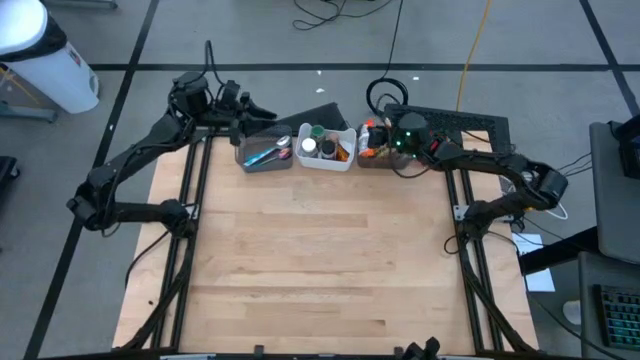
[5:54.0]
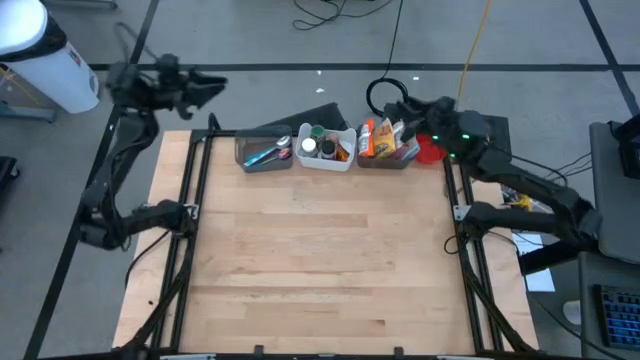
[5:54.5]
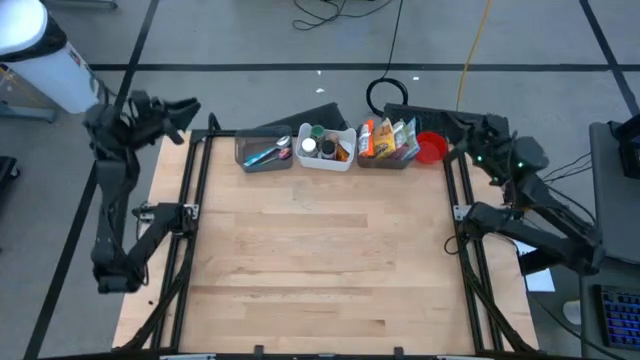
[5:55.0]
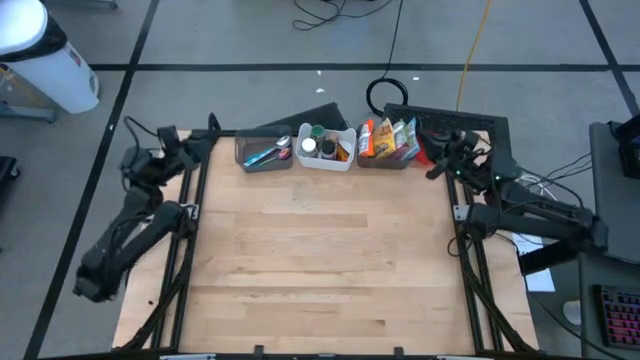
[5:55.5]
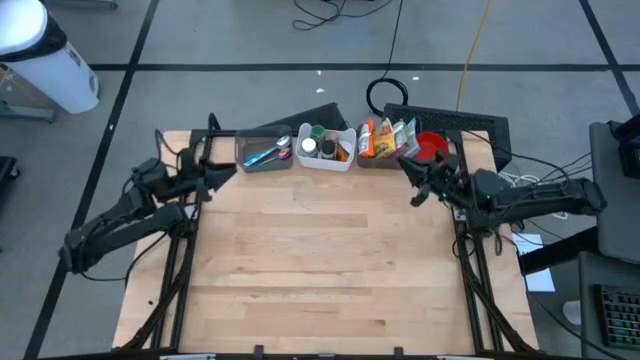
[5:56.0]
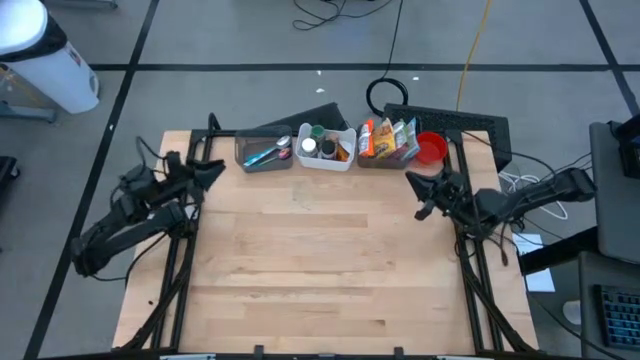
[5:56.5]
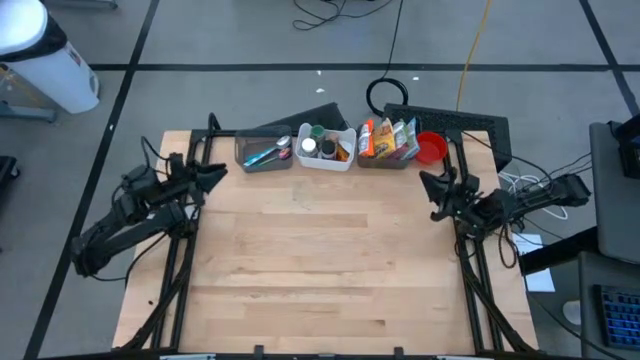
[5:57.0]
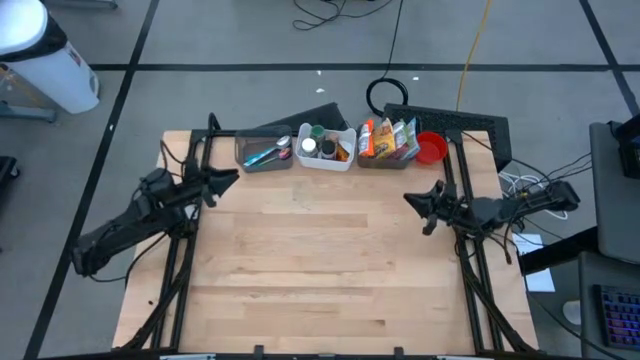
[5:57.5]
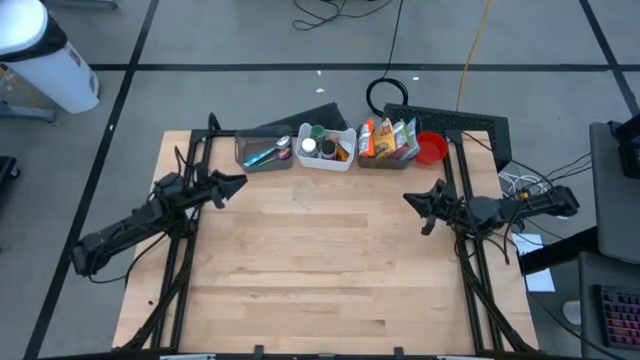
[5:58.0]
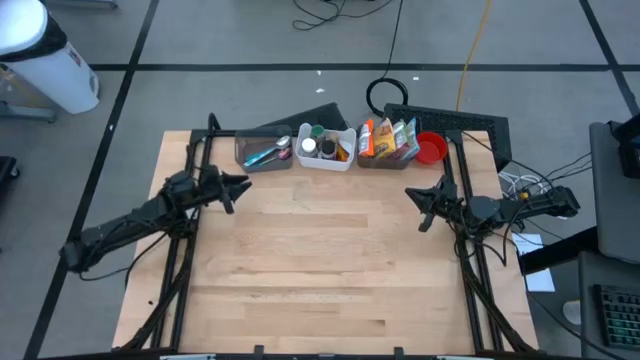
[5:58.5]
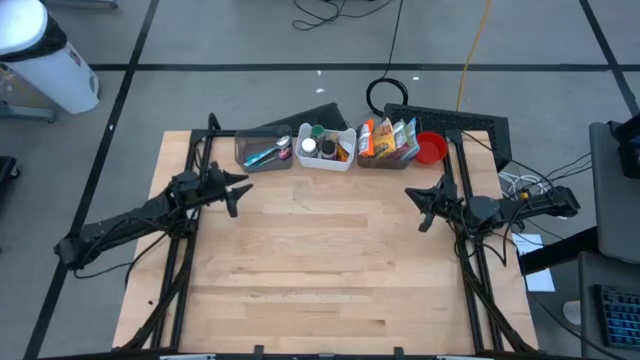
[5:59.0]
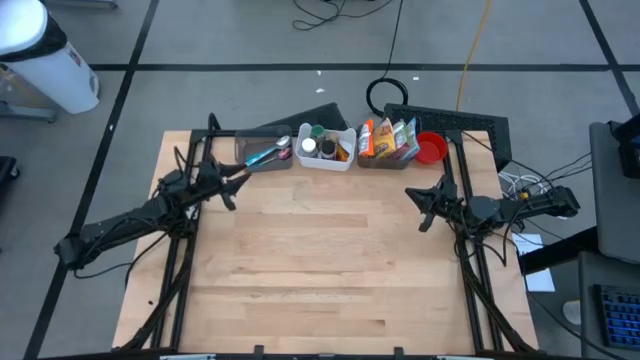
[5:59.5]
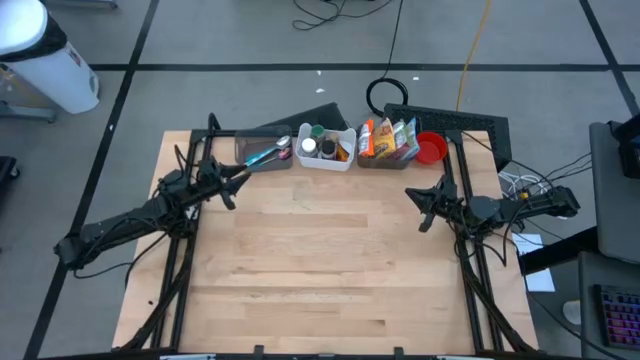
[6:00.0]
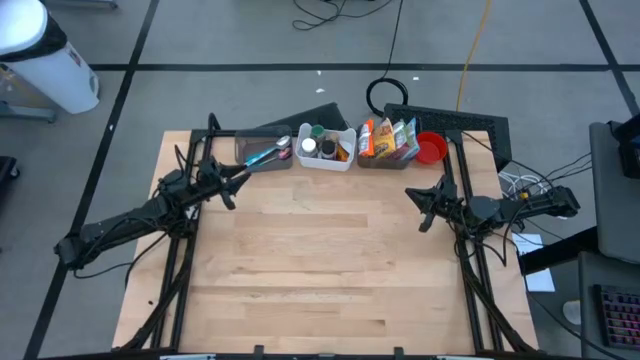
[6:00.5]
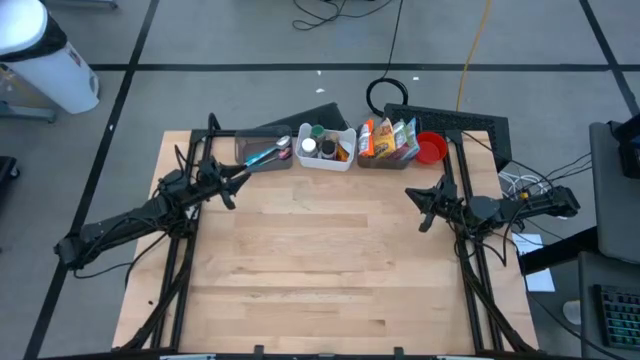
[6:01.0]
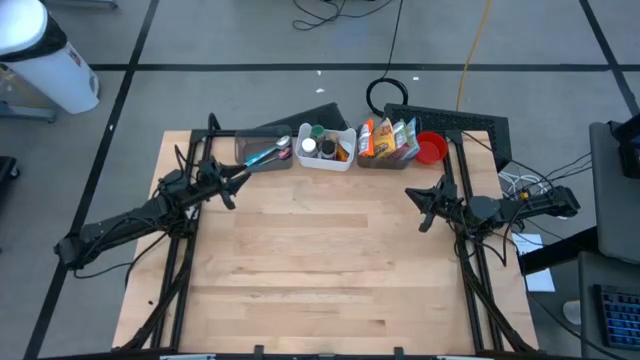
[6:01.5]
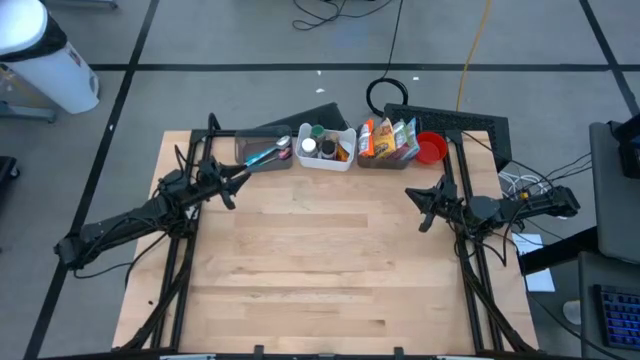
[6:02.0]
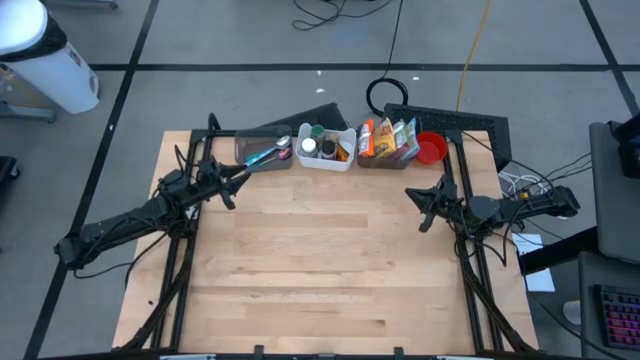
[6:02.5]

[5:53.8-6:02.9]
Task: Pick & Place Food Item
Return to Home Position

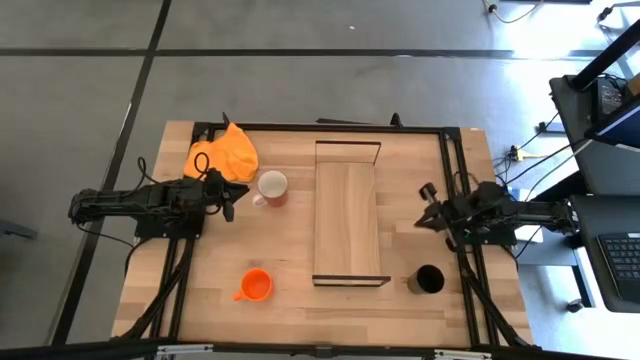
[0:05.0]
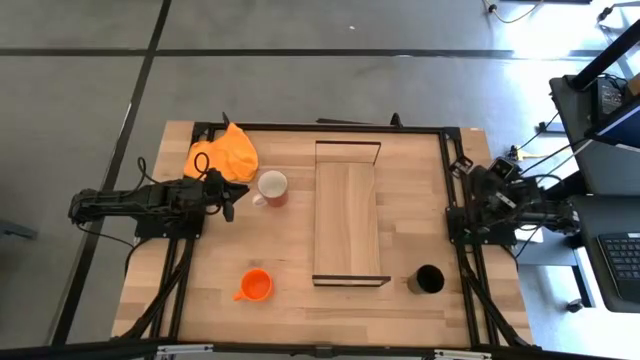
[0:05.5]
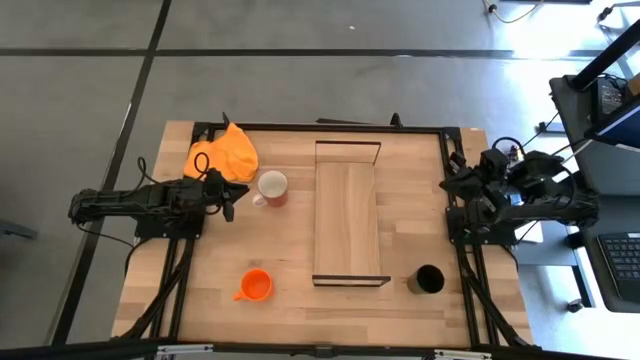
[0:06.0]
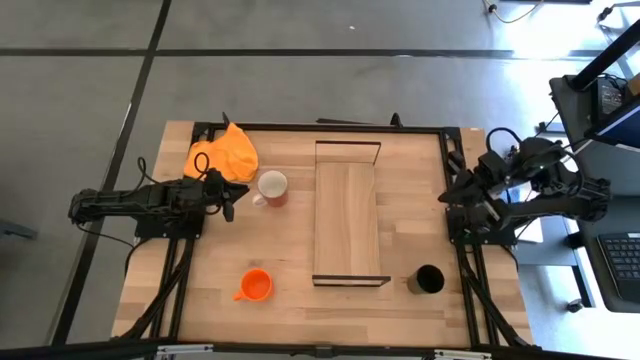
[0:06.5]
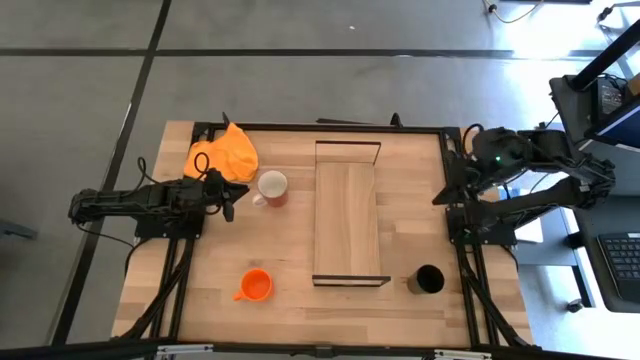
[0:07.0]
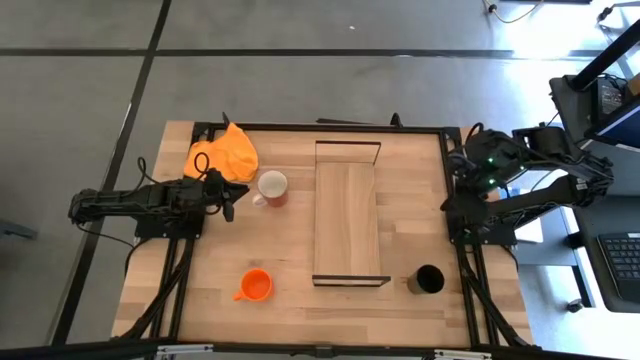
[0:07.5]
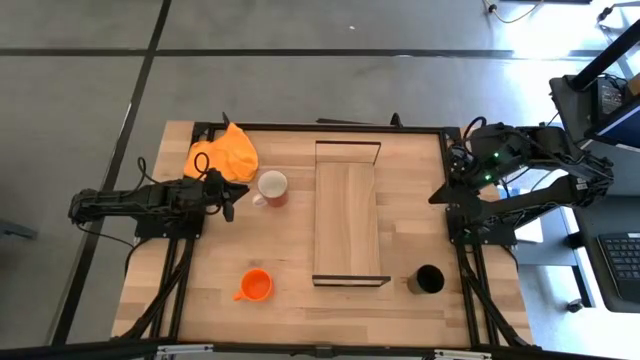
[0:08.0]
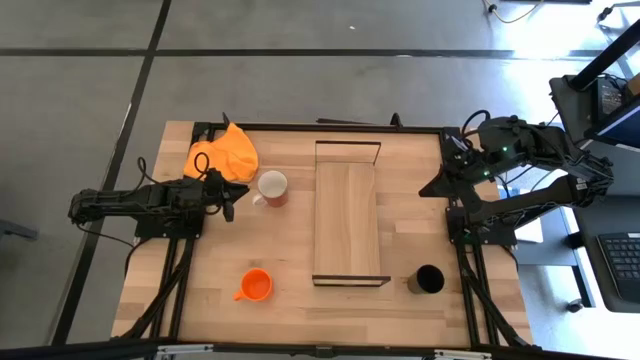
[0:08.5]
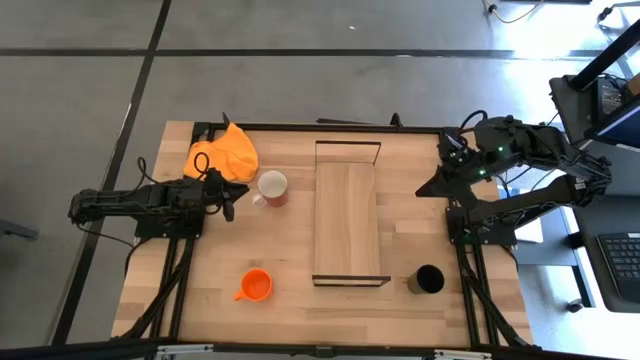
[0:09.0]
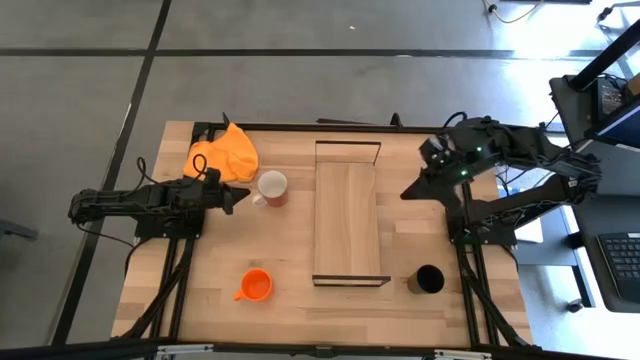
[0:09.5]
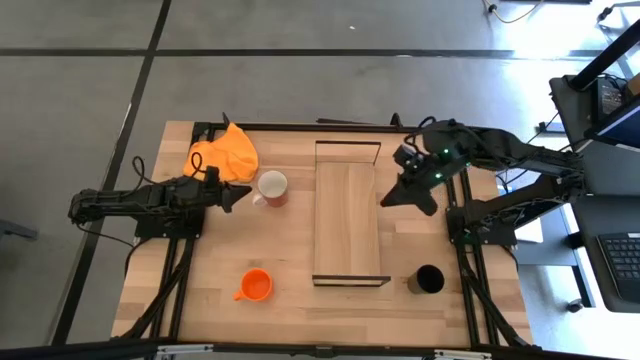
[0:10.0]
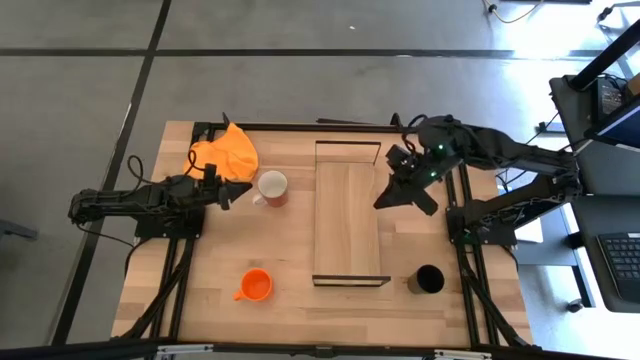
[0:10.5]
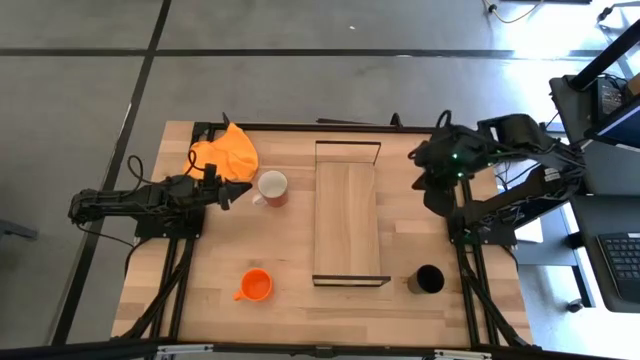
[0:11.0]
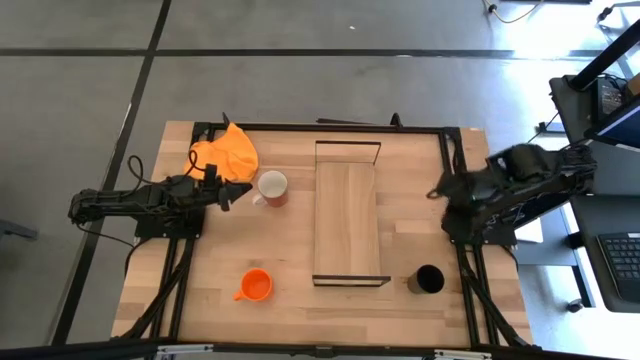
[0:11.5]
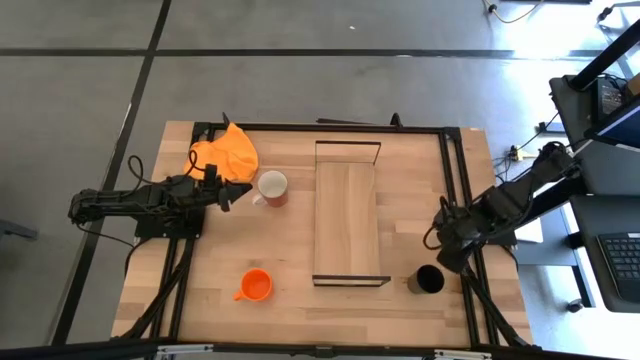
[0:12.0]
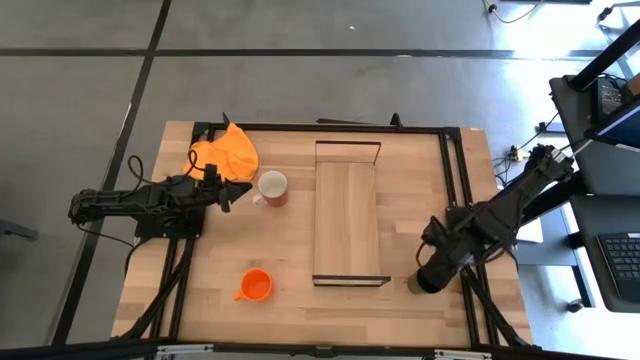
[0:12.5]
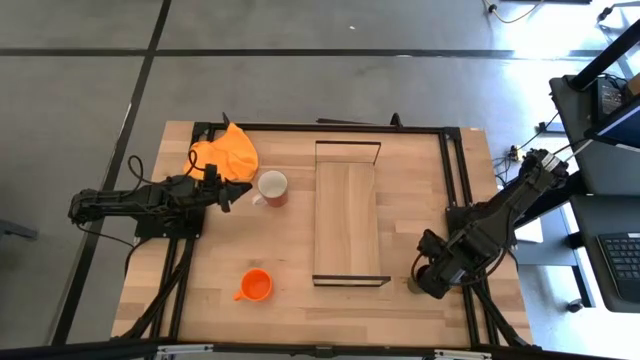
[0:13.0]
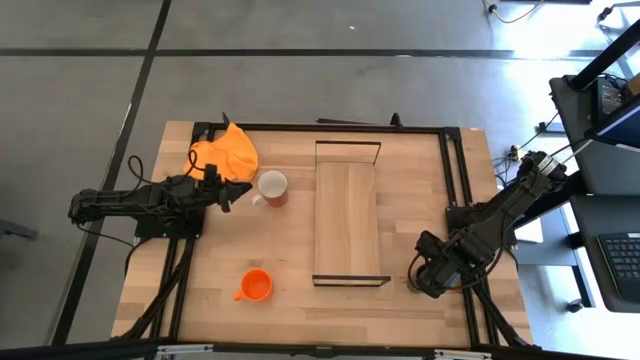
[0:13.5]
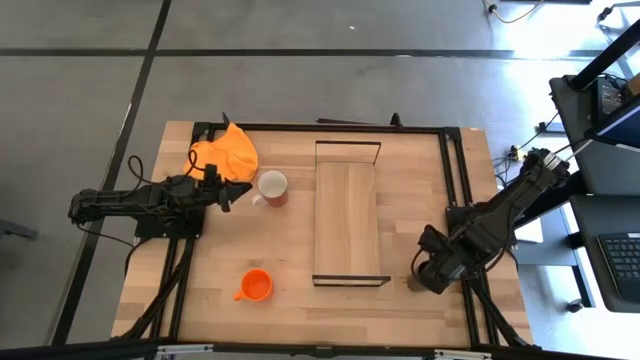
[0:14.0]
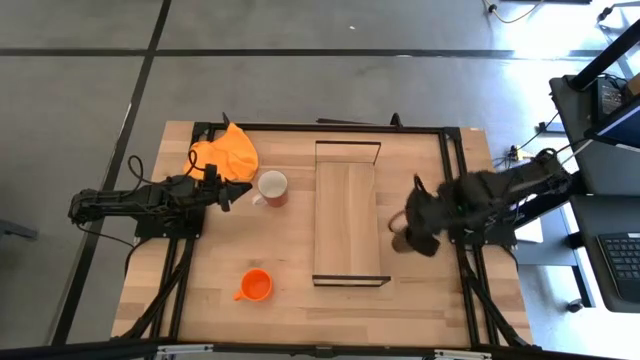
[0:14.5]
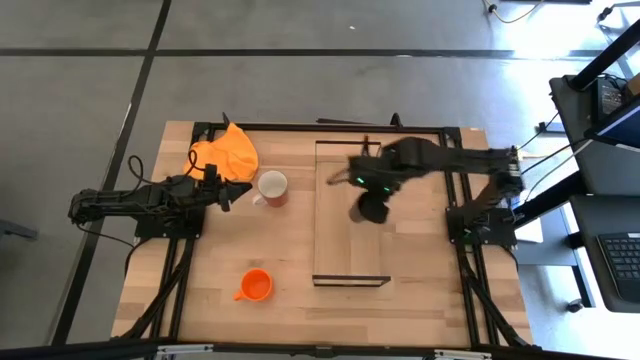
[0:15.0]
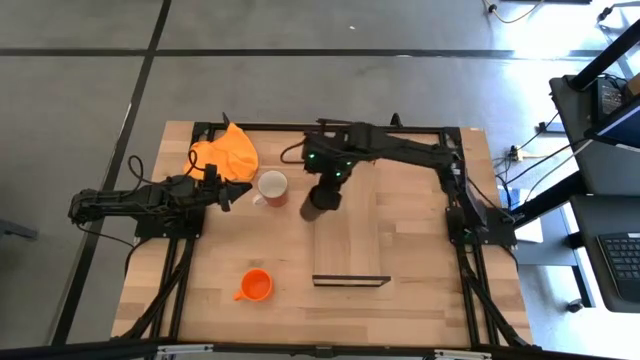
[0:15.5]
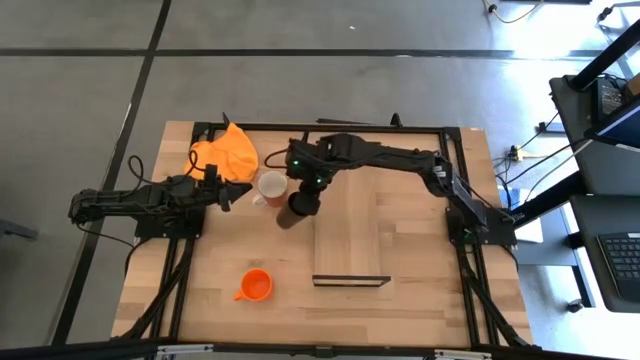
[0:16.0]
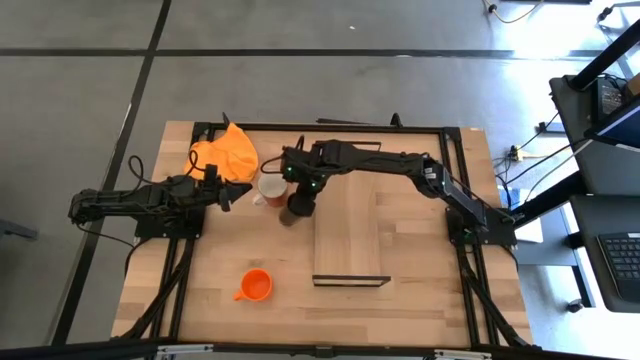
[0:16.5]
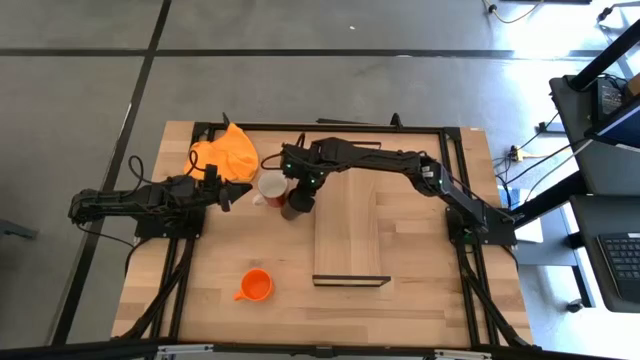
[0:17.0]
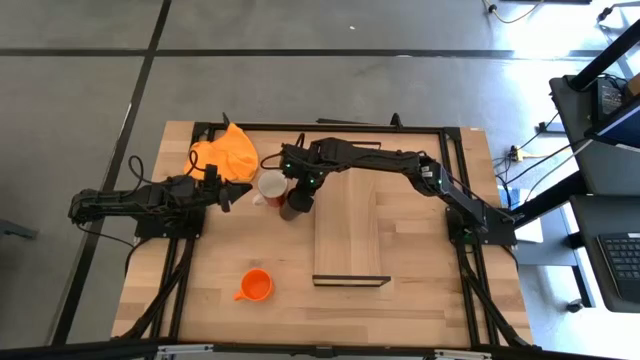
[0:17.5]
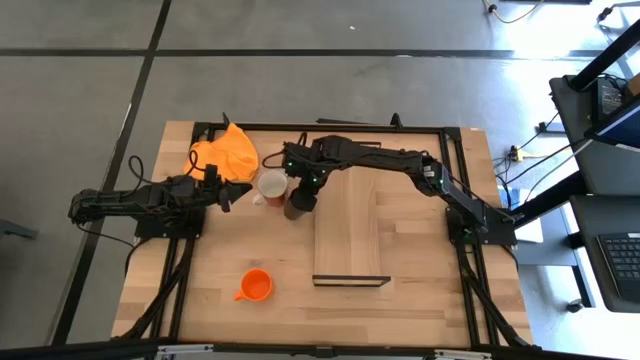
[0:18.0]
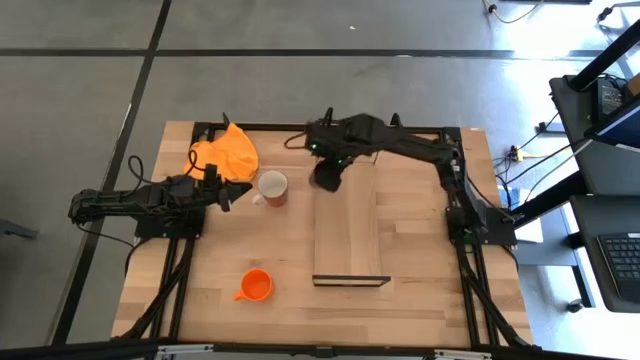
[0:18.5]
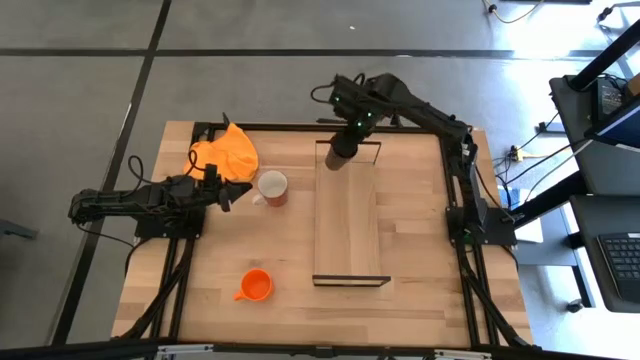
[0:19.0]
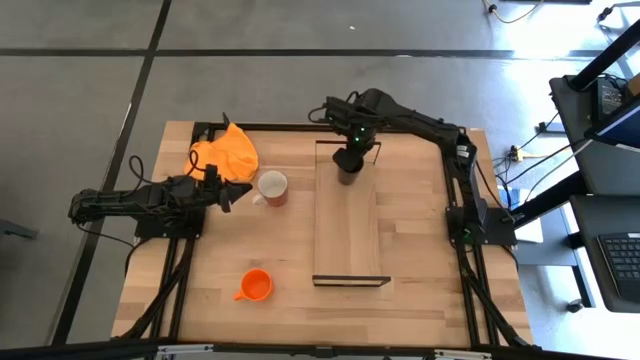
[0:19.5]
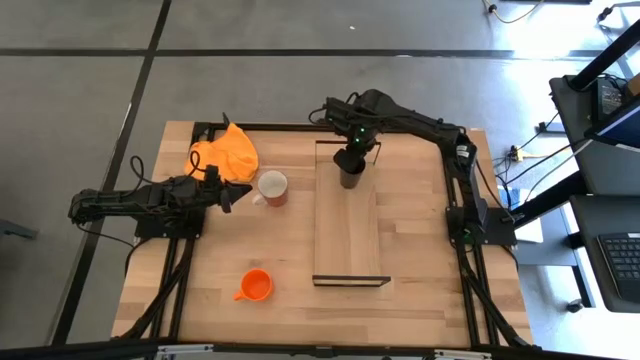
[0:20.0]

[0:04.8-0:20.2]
Task: Stack small to large cups/mugs on shelf
Put the black cup on the shelf
